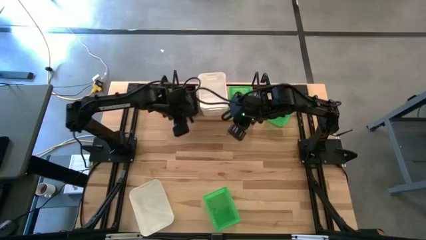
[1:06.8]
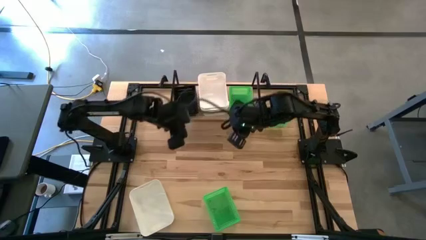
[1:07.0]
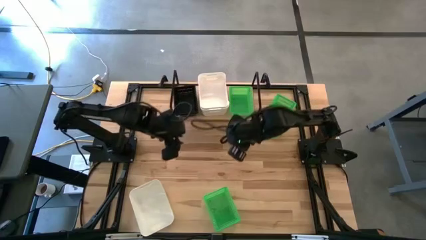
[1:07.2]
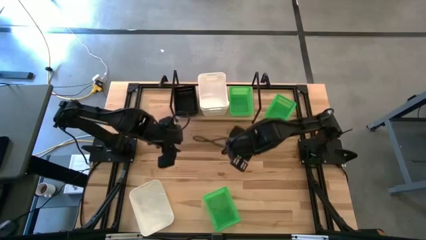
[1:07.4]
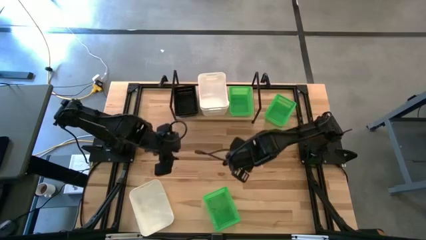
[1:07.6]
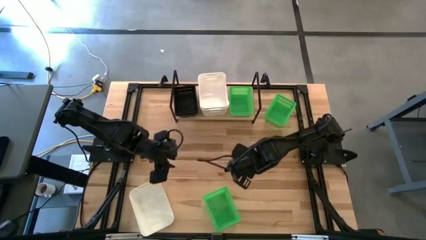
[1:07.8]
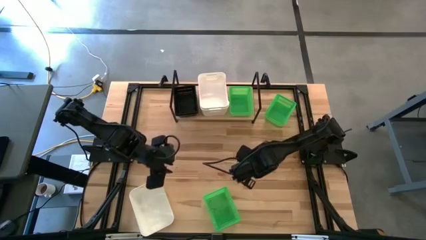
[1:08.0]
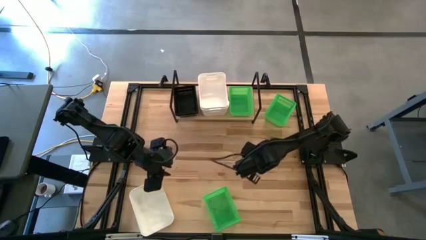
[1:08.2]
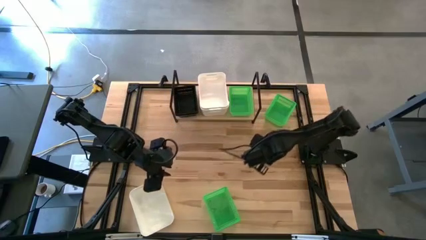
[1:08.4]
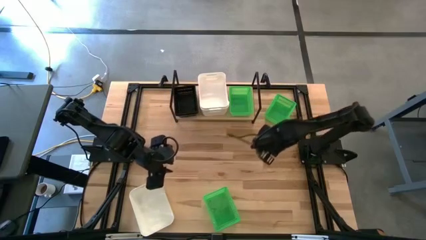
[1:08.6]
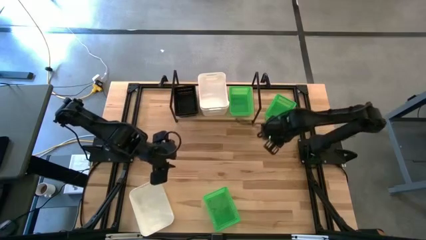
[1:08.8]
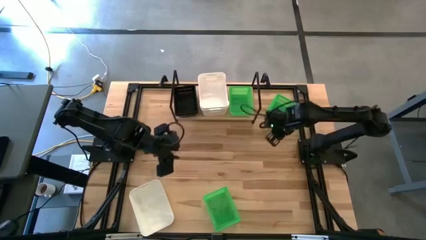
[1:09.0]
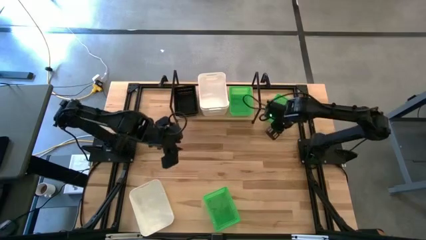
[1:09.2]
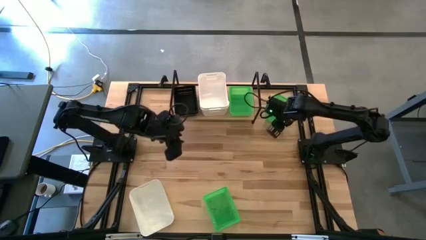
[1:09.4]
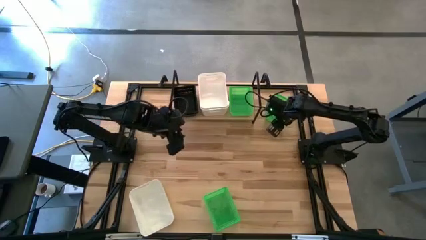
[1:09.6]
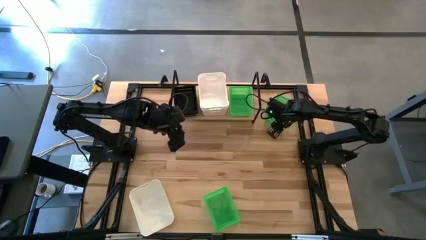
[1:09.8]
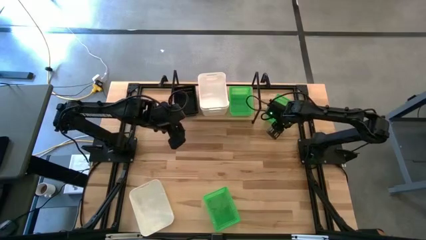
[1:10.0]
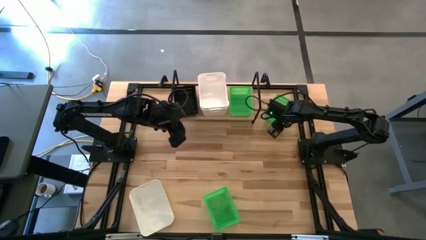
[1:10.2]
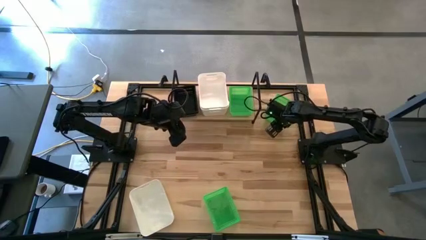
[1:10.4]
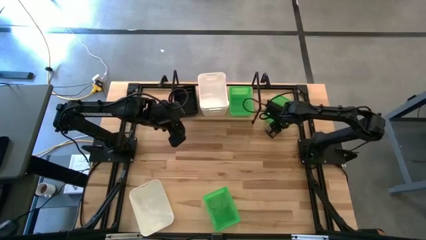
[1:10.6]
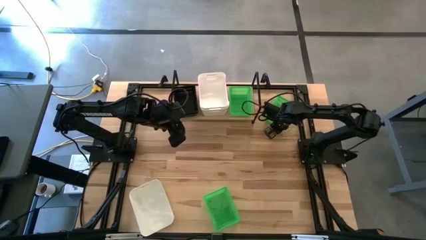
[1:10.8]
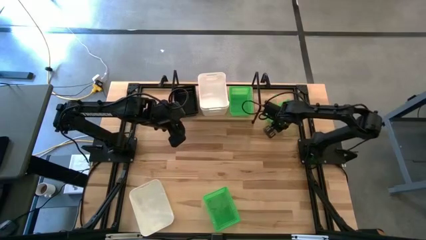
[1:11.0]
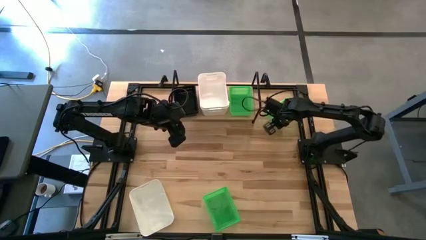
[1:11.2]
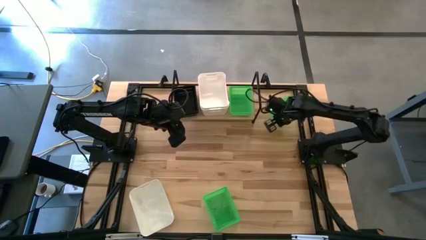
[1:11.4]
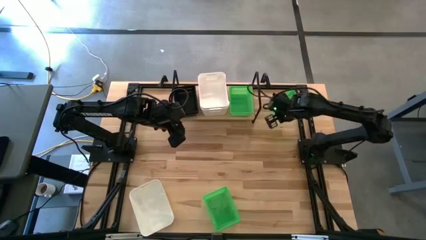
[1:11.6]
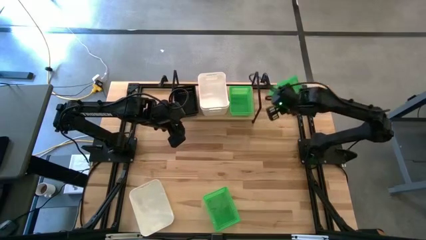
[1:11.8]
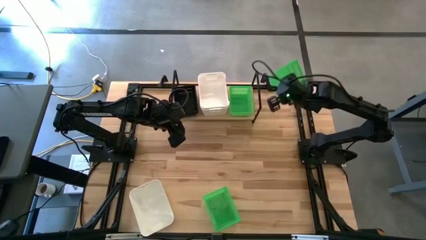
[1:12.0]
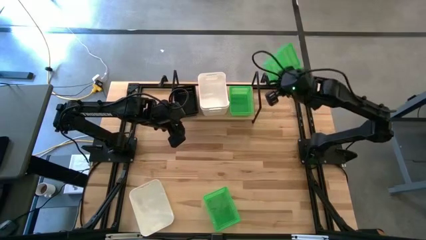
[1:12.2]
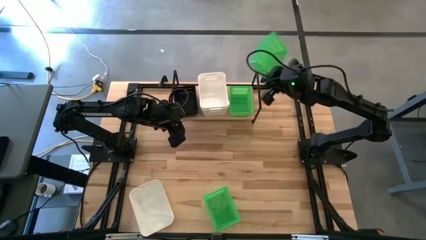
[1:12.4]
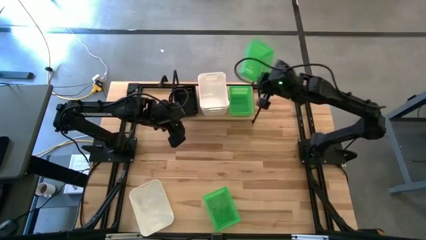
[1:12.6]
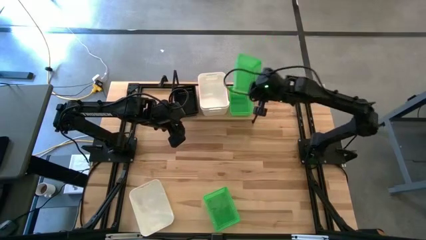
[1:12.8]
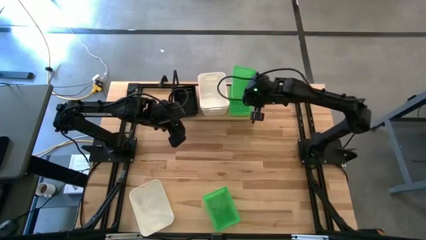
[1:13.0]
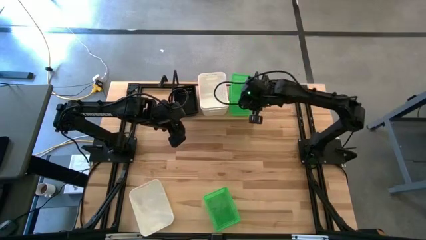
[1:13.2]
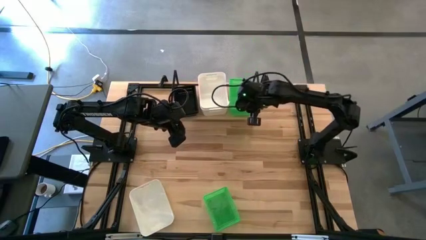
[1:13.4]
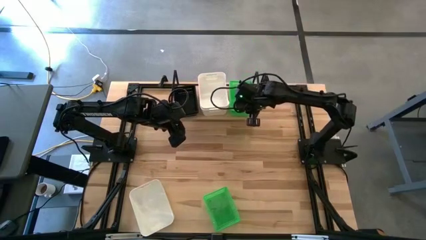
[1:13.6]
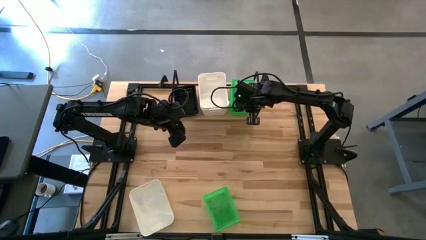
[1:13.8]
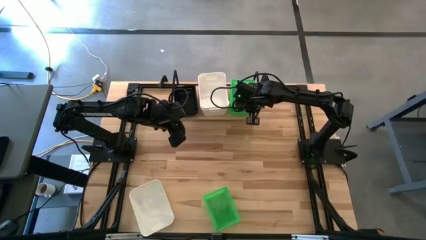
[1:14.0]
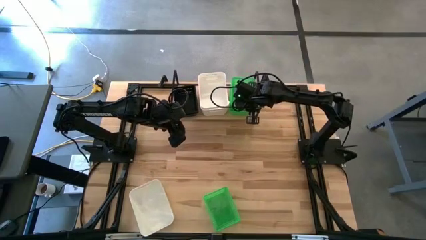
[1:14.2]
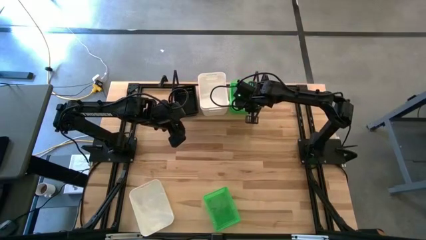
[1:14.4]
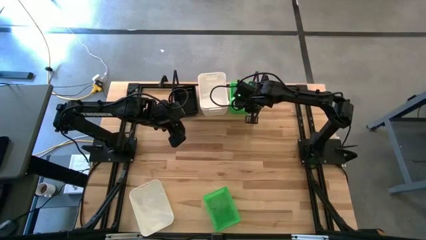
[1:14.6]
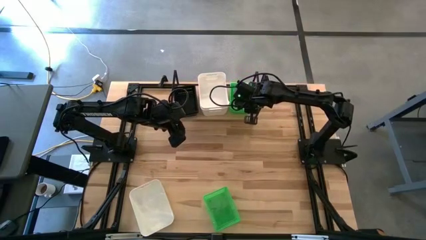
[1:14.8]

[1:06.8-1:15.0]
Task: Stack baskets on shelf by color
Stack the top green bin on top of the green bin on the shelf

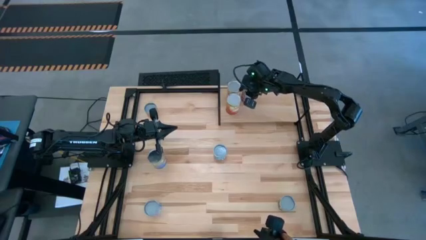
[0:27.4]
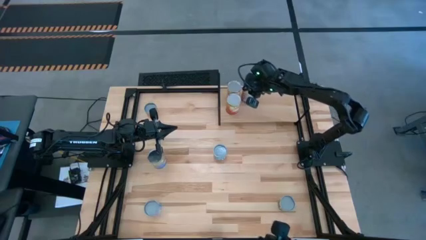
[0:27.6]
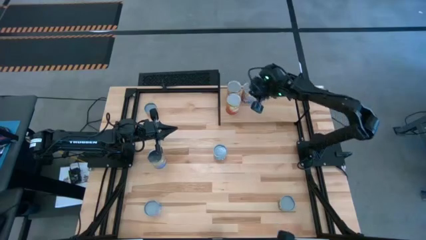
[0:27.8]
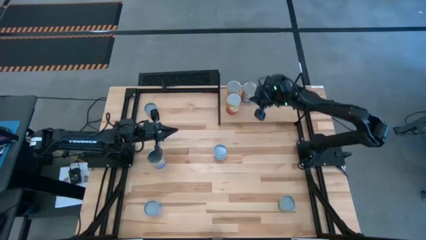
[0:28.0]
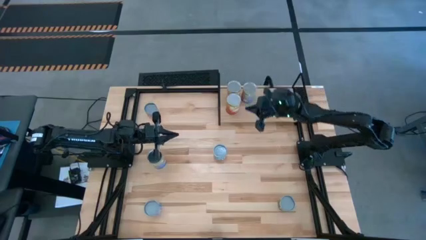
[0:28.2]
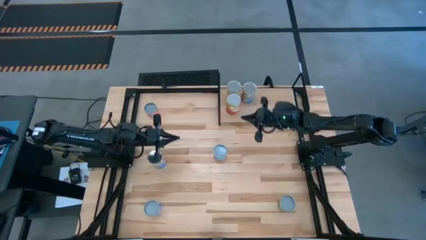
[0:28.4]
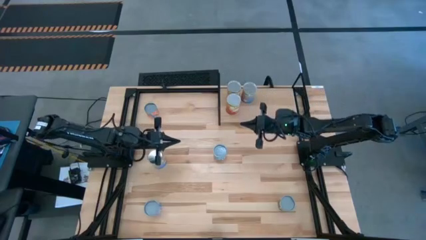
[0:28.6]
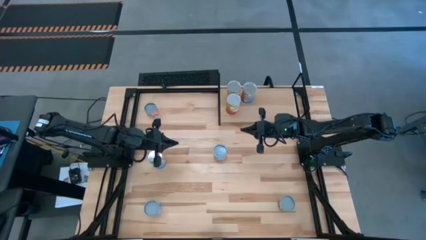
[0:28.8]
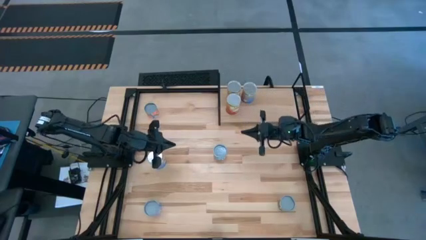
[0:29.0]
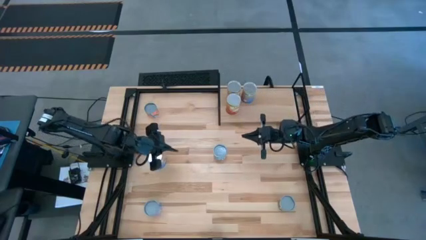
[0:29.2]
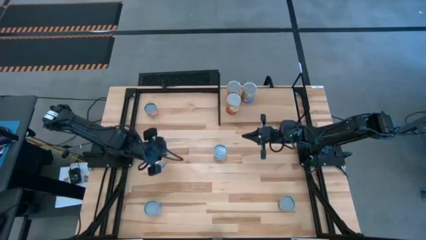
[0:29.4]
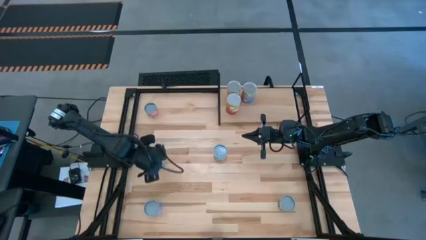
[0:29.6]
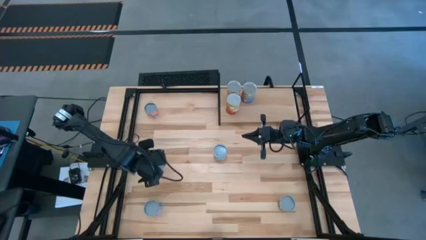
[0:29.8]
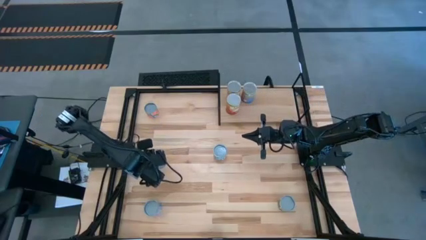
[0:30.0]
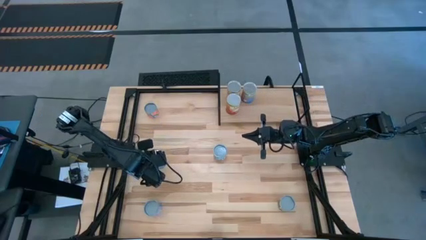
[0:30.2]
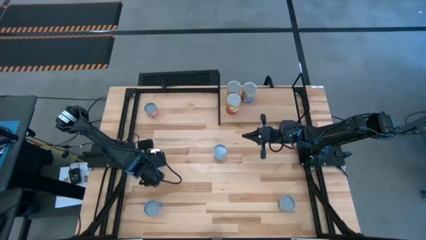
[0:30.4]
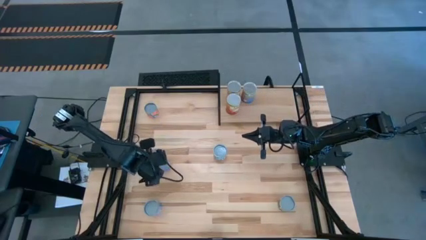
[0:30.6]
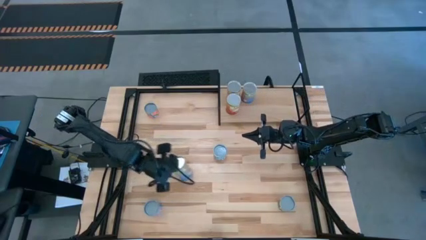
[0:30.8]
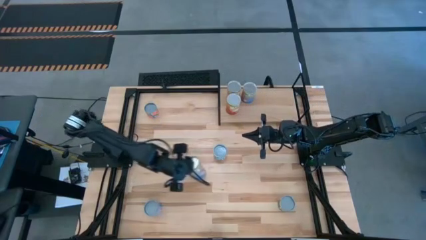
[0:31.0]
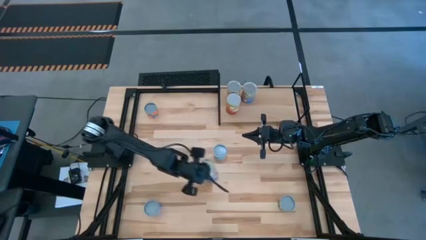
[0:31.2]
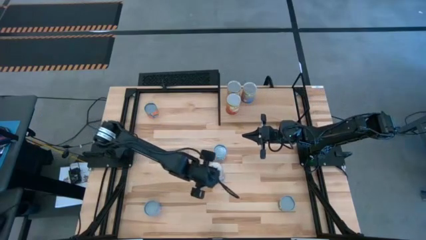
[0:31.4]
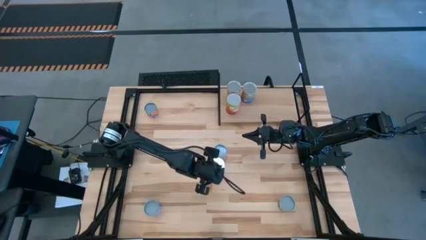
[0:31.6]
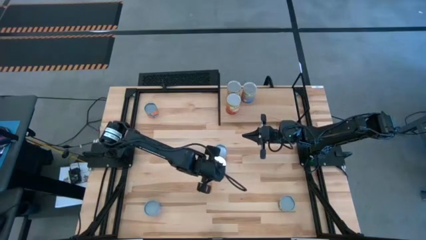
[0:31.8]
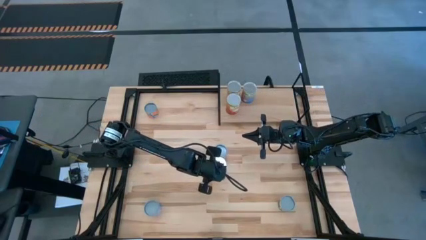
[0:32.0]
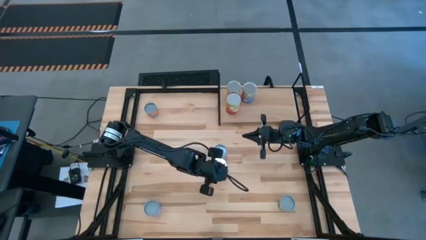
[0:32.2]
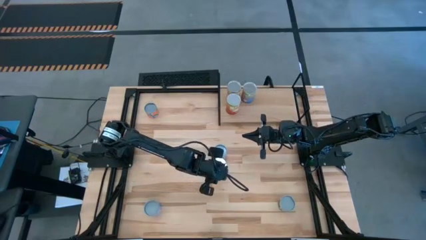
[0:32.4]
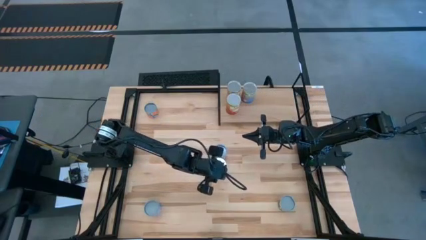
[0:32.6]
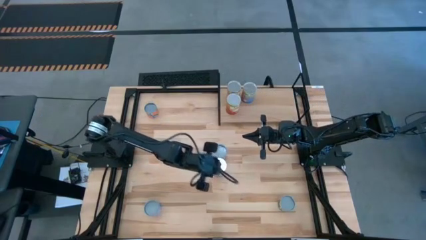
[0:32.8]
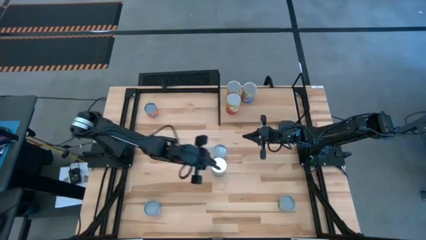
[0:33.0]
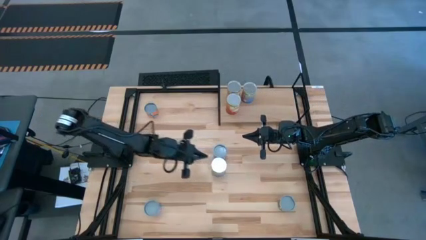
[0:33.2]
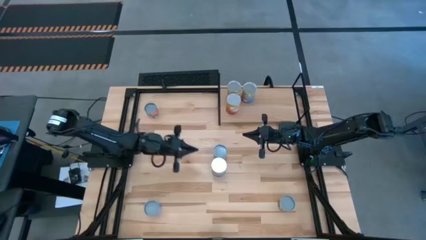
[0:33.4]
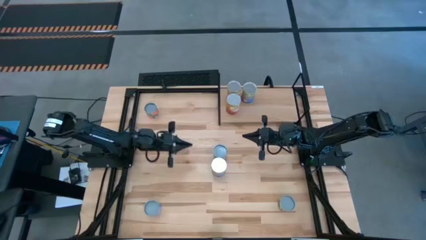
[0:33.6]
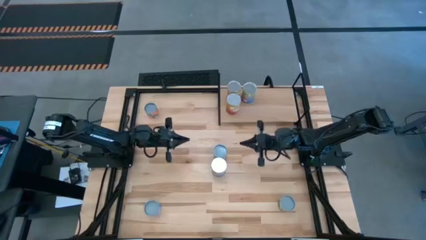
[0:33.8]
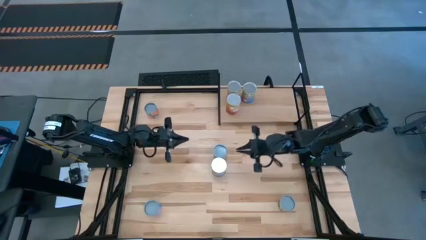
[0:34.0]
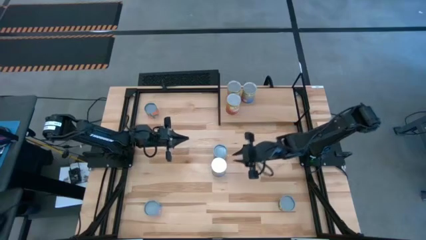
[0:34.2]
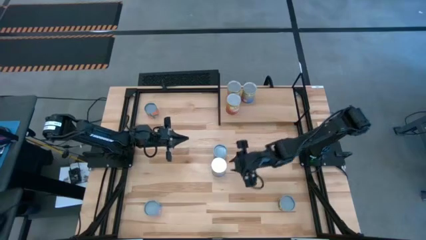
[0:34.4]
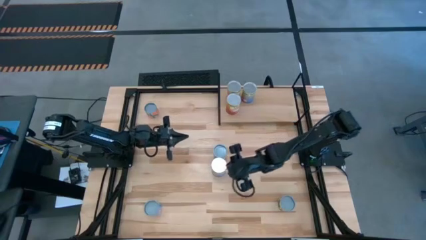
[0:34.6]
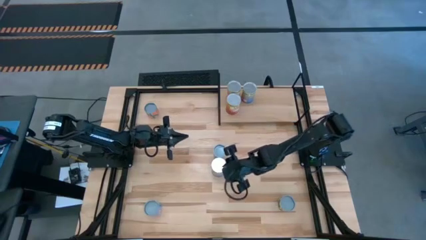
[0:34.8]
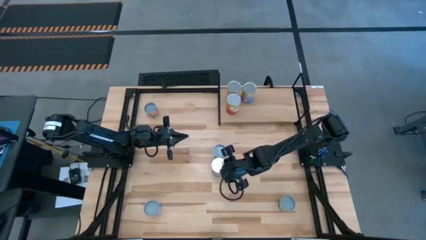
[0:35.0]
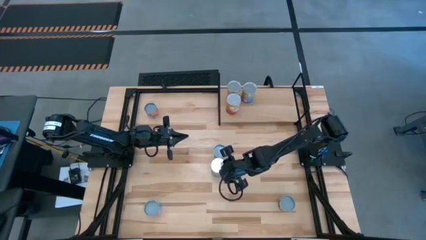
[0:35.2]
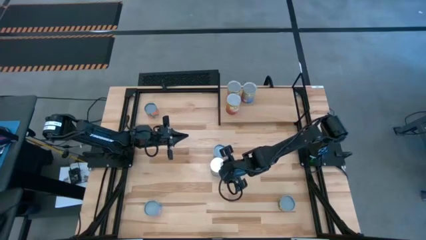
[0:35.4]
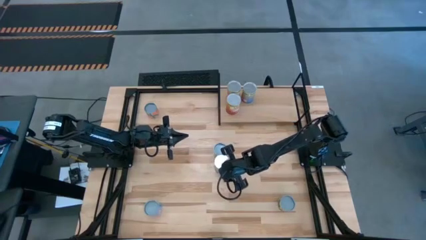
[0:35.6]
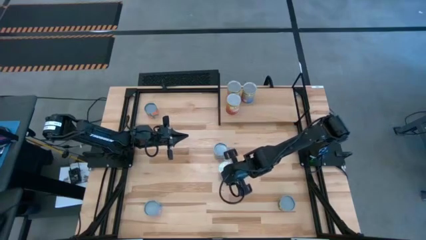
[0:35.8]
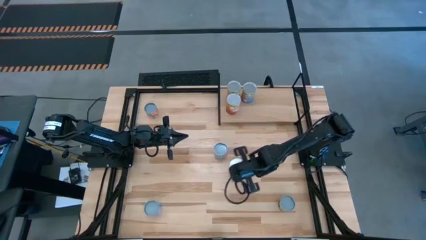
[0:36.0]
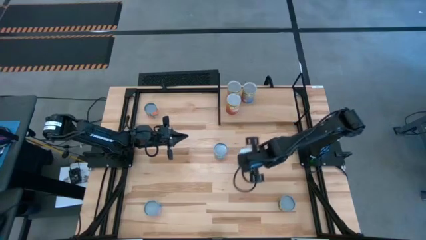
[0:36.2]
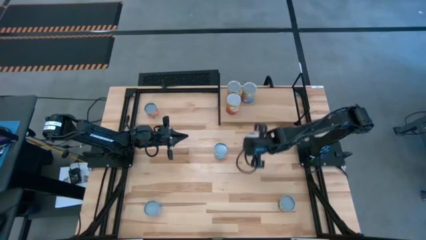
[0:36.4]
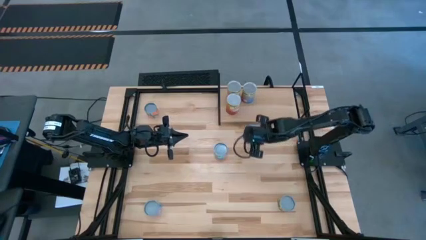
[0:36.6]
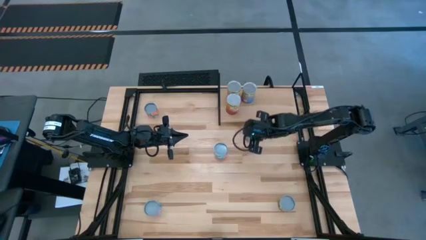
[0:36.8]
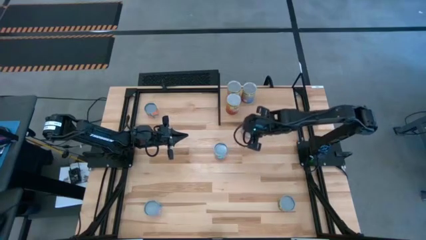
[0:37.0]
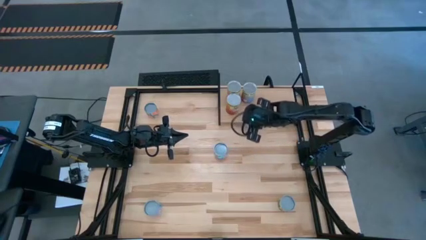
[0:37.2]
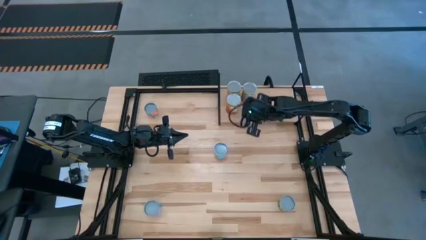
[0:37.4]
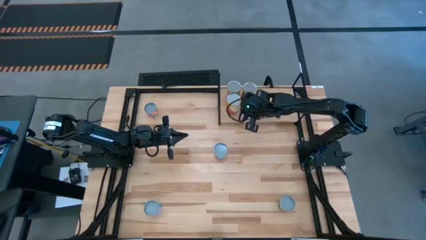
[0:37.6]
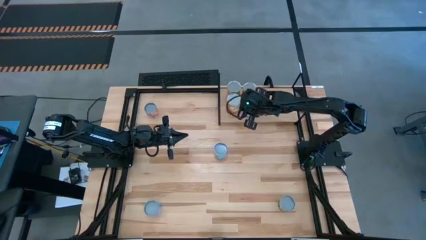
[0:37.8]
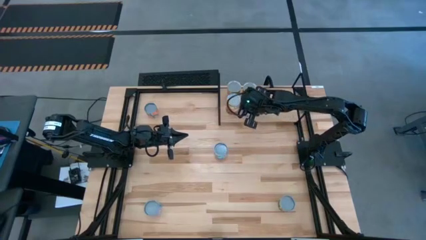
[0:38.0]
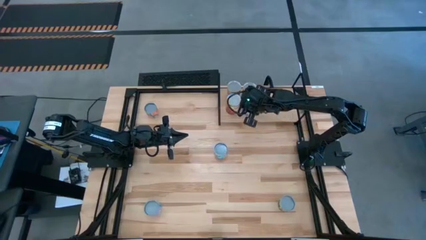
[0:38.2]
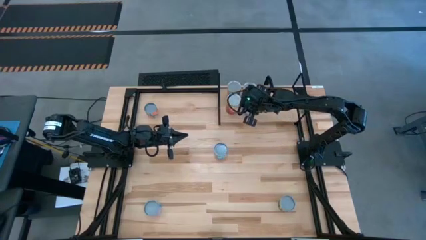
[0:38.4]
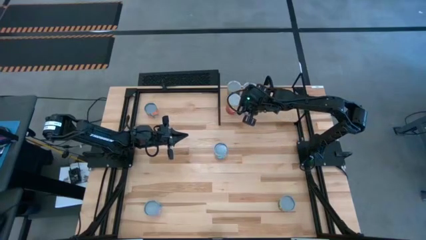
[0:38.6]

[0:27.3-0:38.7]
Task: Pick and place cans onto a shelf
Put the canned peaches on the shelf aligned with the other canned peaches
